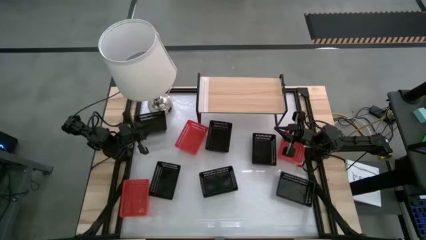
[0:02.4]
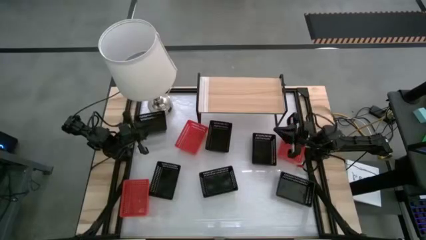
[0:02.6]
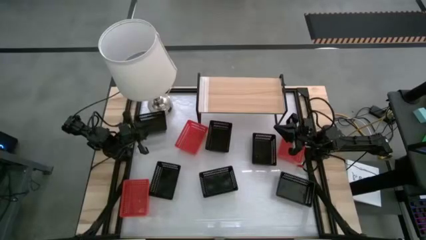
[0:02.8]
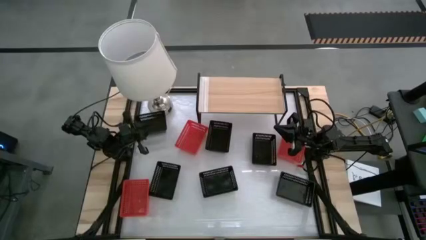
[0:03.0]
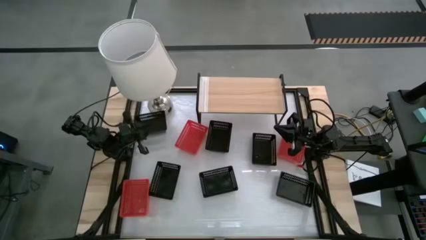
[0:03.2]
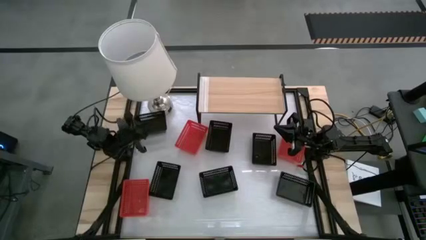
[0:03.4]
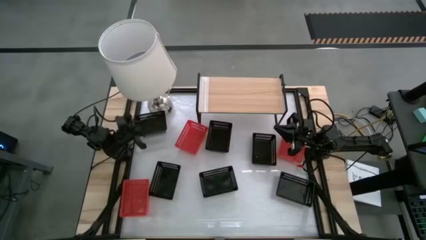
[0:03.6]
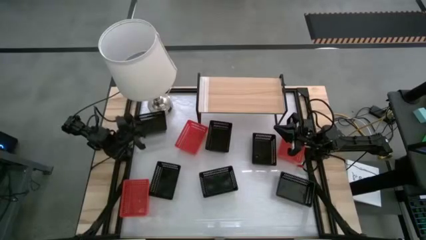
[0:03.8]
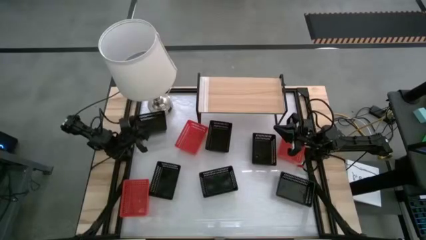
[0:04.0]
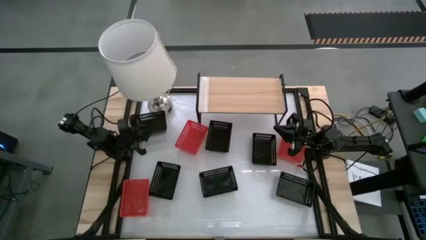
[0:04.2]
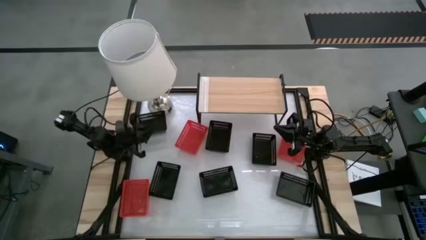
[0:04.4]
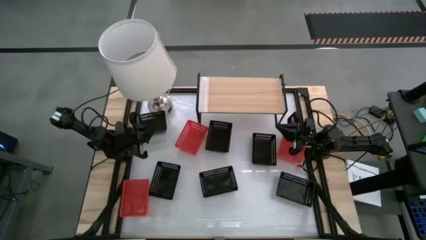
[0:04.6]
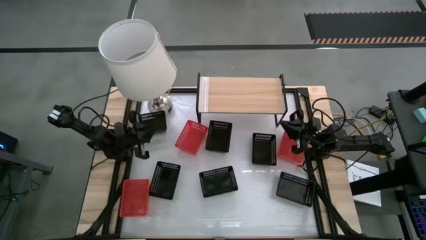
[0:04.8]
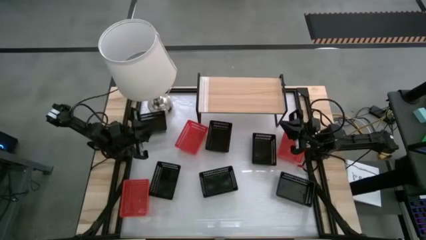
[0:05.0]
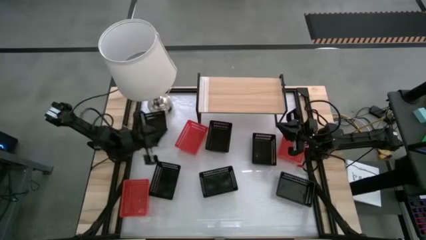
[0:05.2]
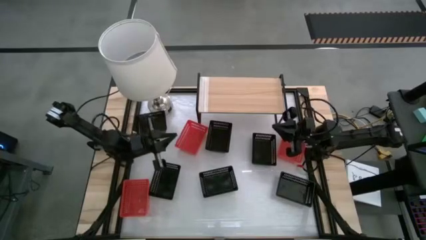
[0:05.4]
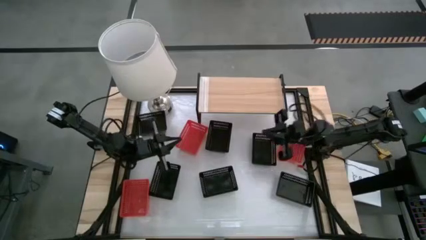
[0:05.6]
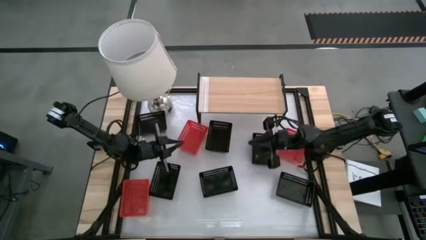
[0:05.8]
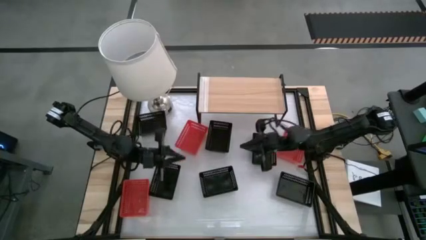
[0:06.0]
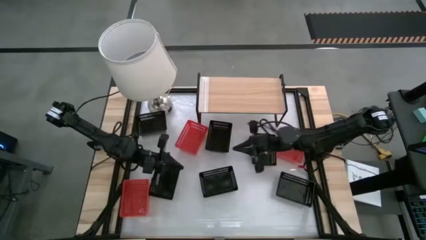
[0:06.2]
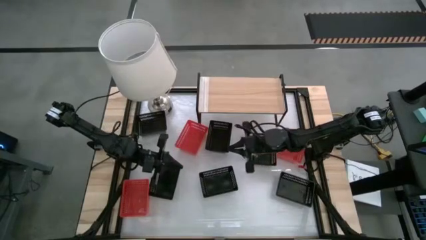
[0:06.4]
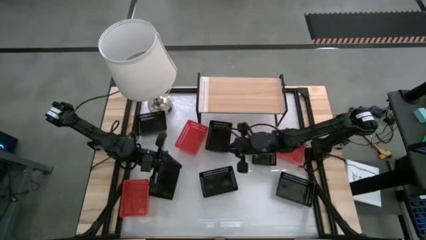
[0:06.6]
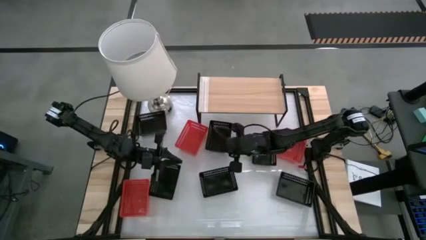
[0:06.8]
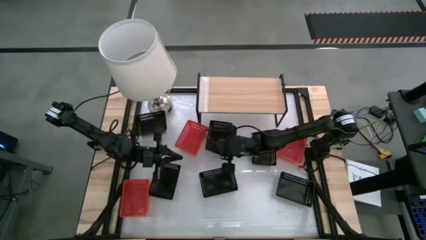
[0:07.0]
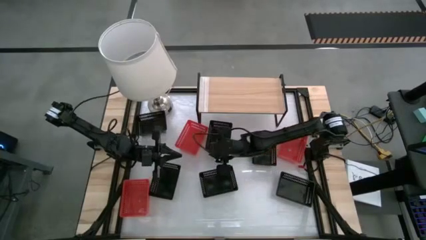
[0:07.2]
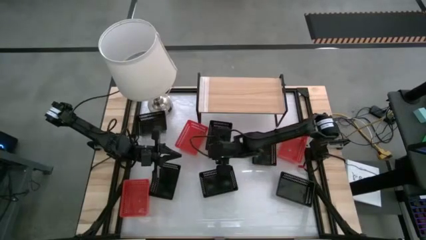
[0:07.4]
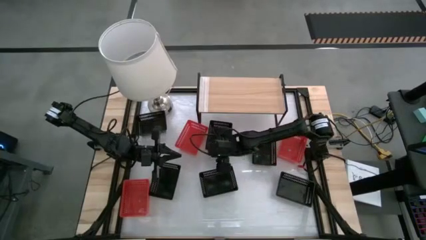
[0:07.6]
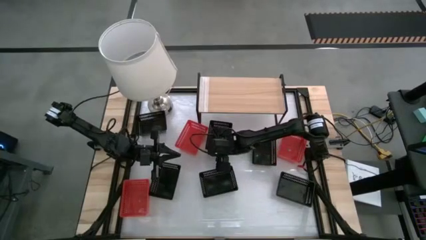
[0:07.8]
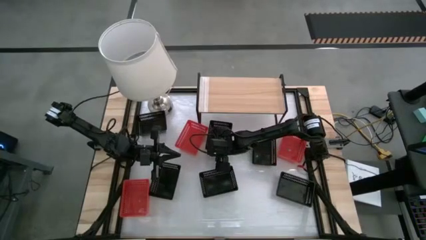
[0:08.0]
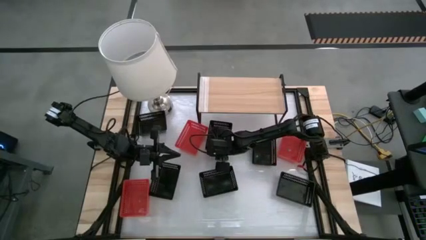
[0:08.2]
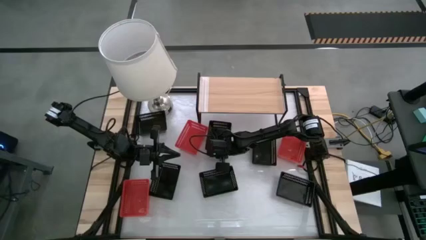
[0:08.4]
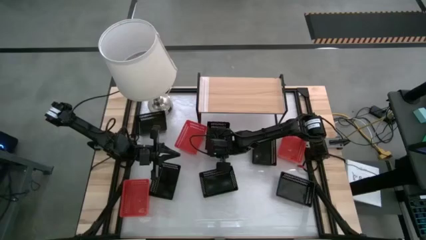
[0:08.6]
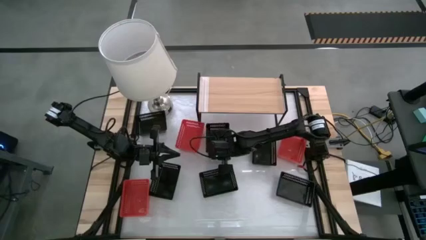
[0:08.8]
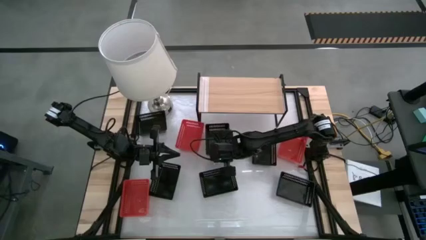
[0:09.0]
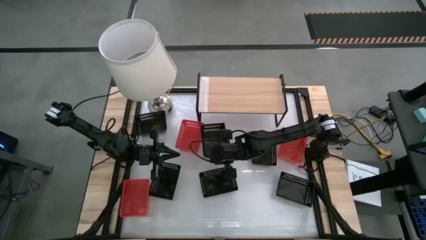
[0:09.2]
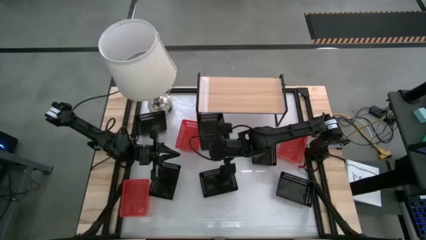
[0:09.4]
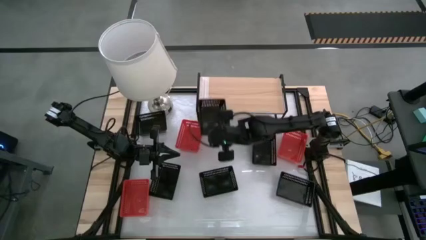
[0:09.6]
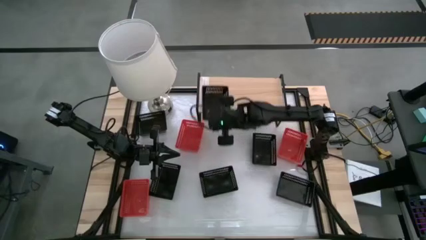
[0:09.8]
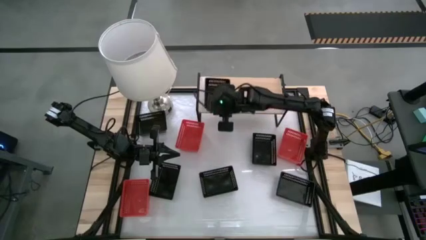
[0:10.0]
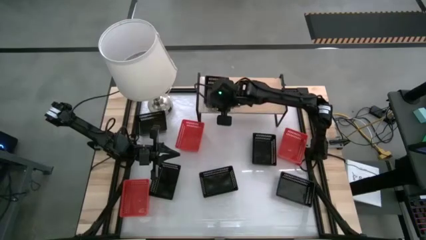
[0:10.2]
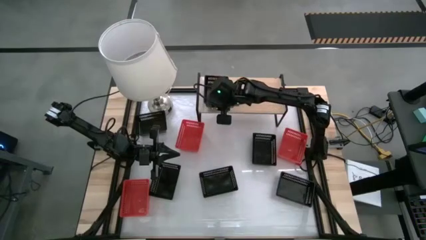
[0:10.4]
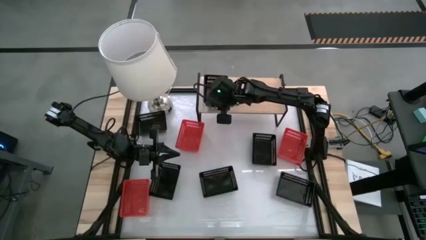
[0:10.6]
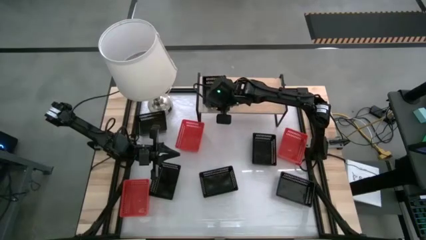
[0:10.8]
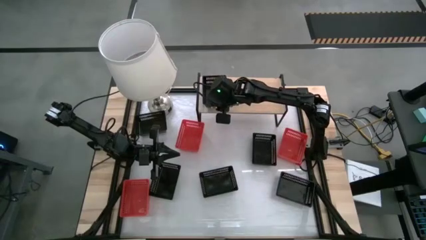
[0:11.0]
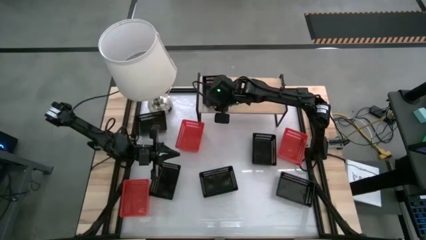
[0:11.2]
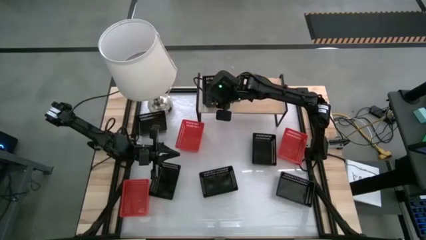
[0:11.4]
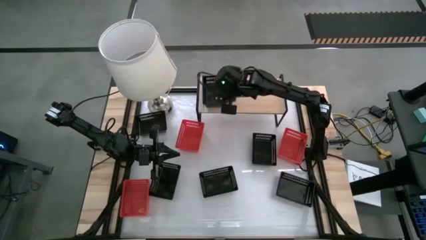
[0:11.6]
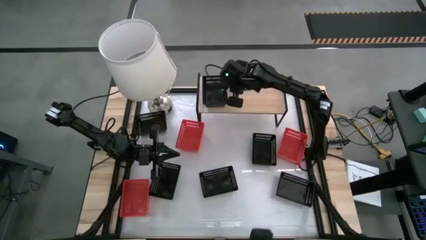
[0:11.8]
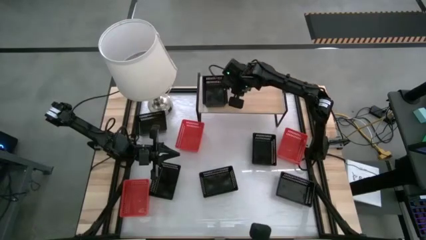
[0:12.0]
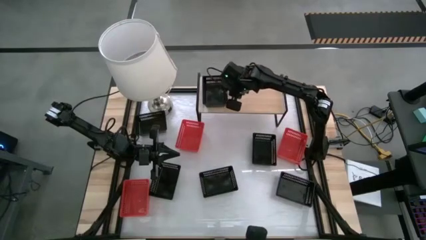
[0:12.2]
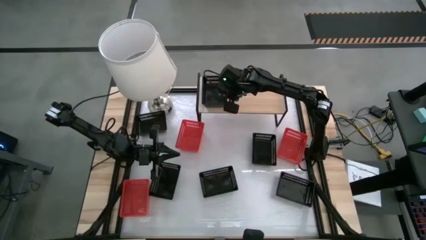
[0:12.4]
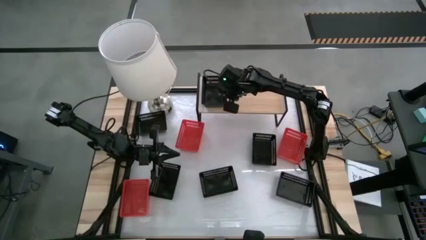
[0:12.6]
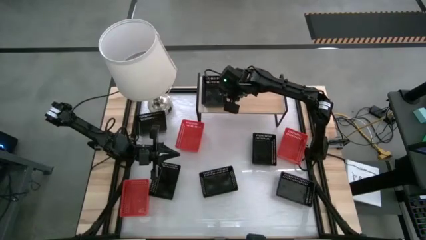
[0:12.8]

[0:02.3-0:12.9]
Task: Stack baskets on shelf by color
Put the black bin on the shelf

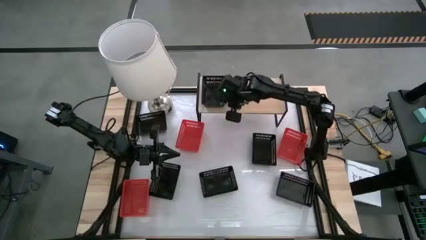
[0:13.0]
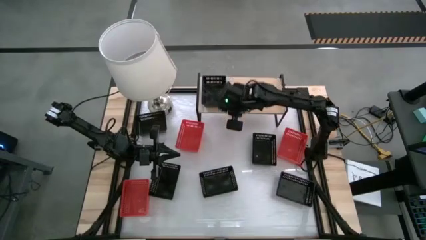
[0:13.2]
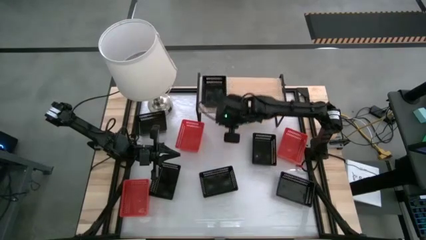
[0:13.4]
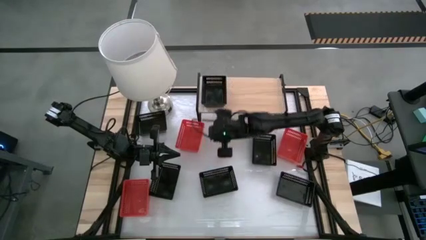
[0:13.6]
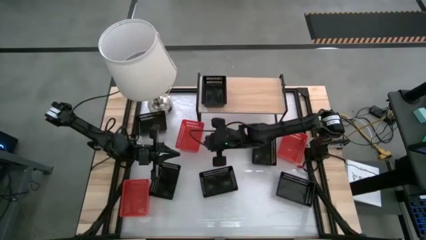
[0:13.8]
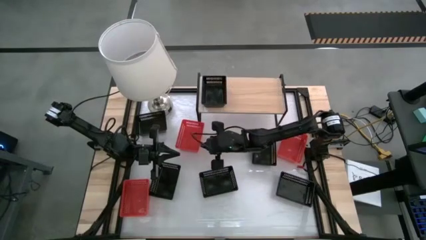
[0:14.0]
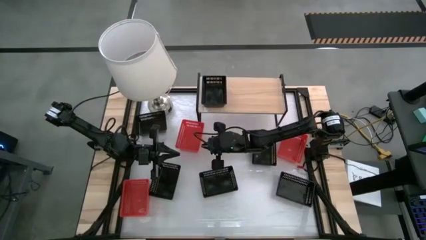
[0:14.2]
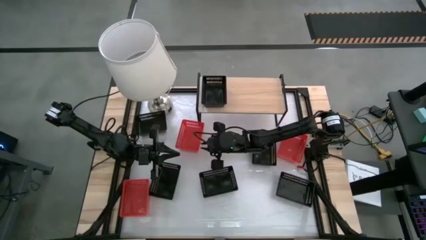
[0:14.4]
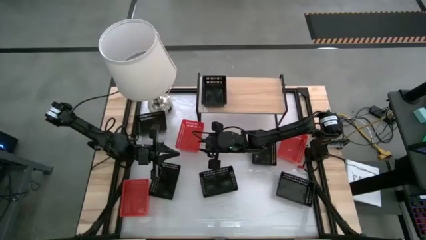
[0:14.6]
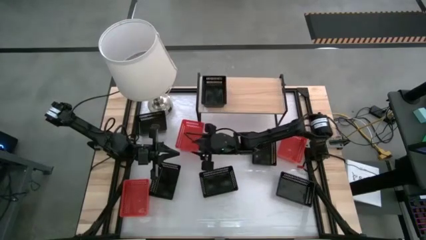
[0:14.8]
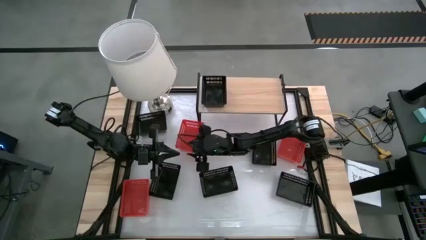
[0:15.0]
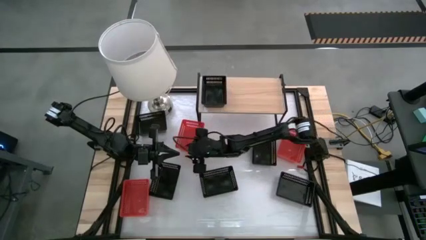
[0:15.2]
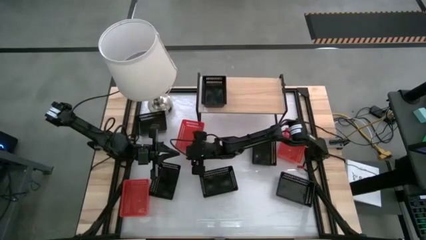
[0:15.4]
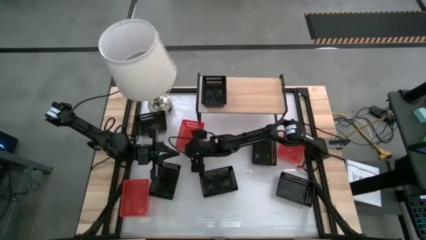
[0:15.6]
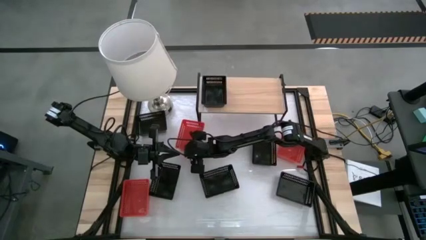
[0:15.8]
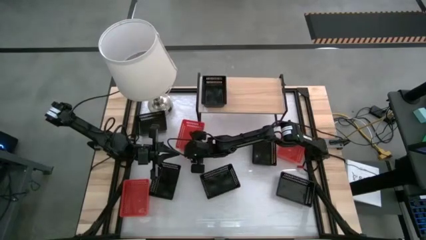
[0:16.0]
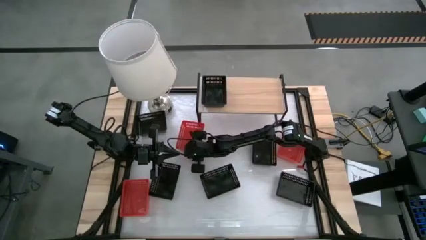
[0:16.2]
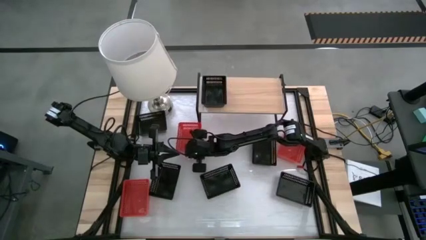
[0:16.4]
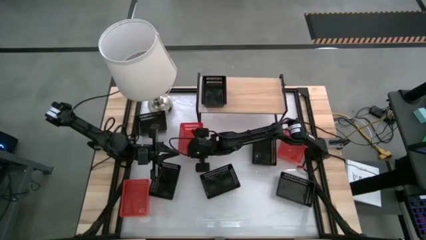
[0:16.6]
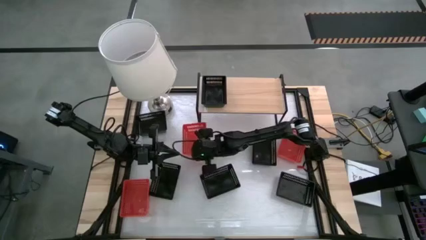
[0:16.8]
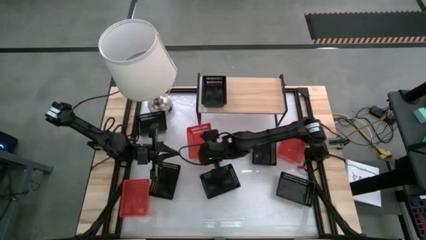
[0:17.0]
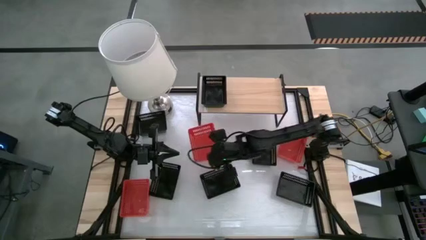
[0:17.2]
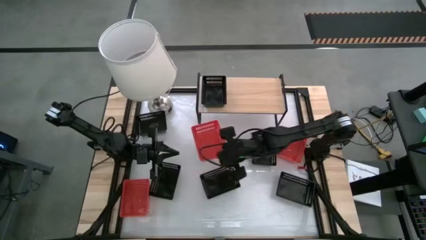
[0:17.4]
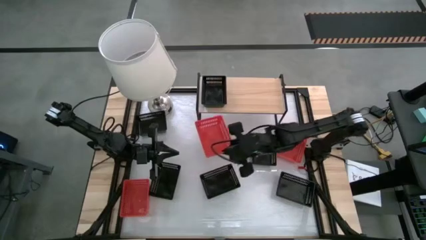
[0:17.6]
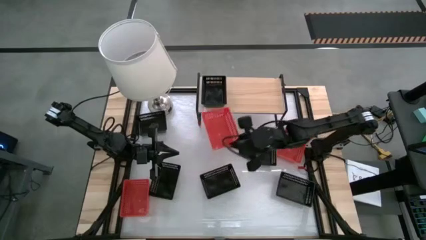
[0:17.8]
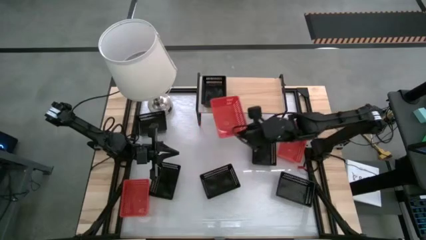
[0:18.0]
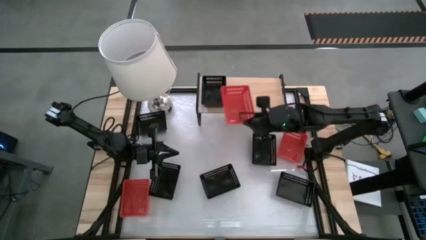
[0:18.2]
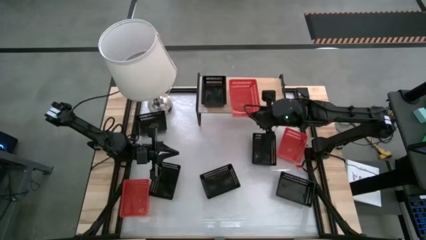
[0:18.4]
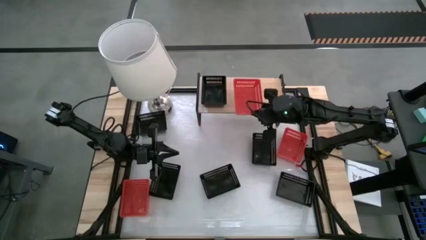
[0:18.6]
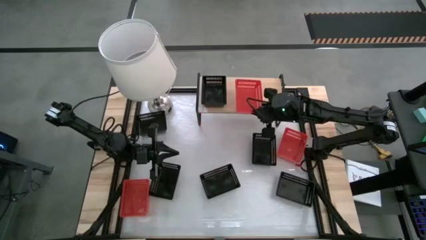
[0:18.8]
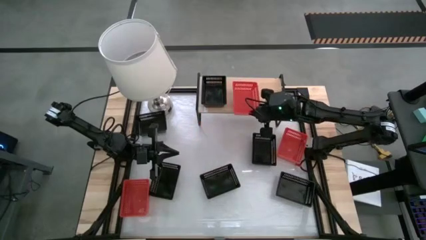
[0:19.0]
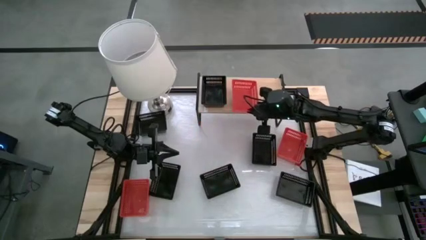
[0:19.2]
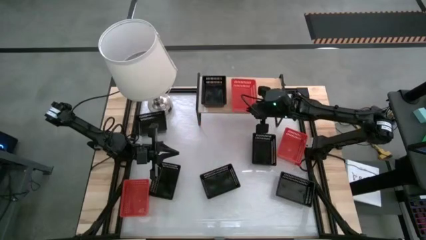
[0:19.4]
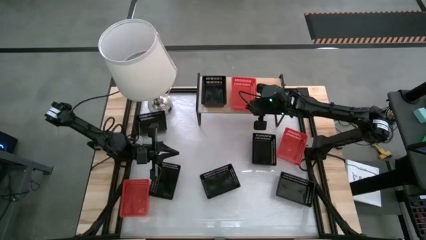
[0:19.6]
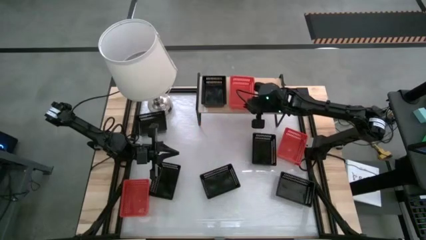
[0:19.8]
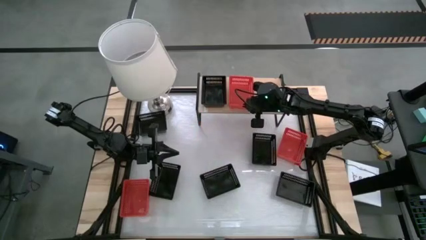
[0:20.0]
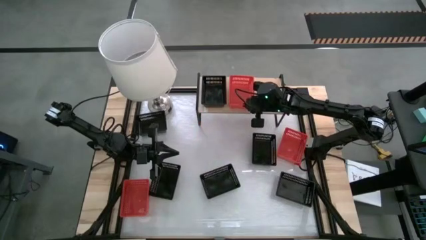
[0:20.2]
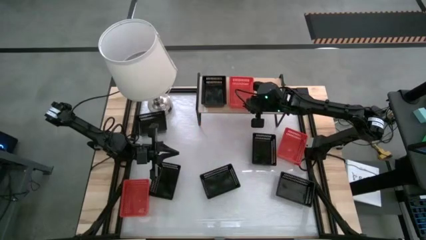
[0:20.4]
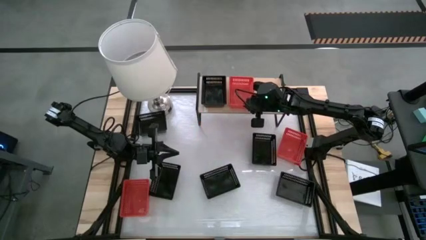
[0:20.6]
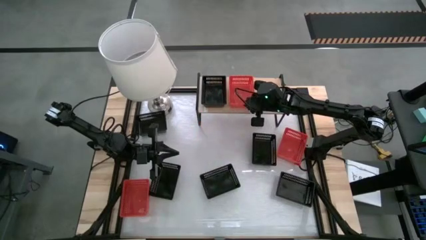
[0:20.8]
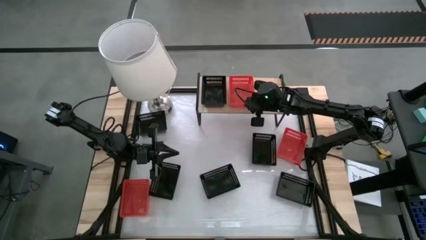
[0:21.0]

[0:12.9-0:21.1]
Put the red bin on the shelf
